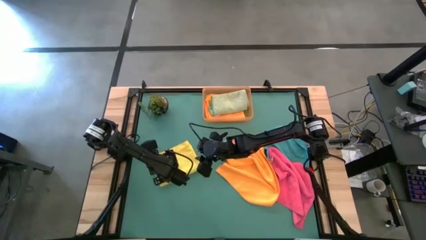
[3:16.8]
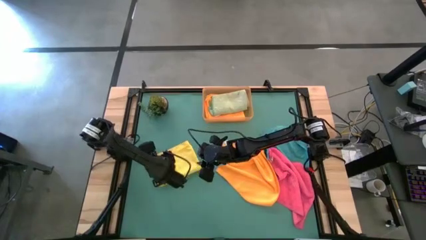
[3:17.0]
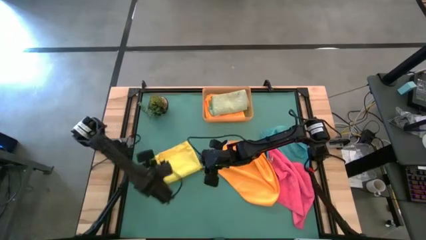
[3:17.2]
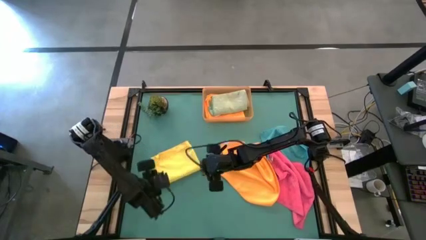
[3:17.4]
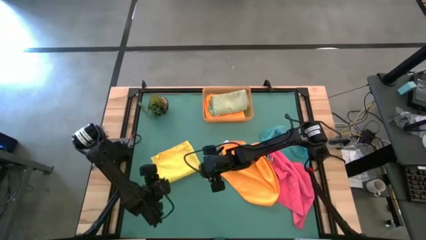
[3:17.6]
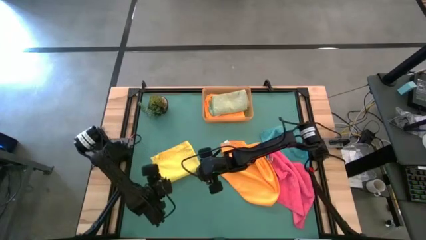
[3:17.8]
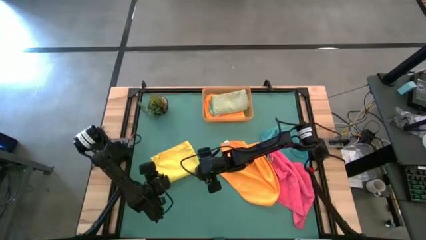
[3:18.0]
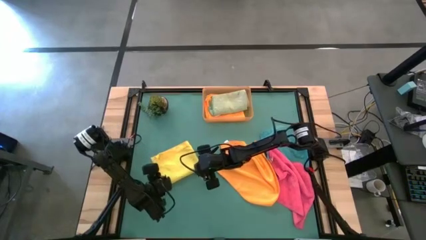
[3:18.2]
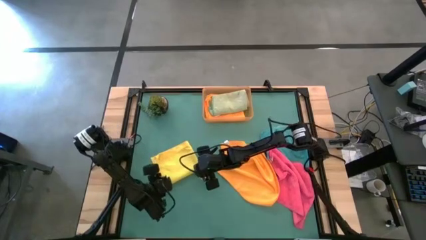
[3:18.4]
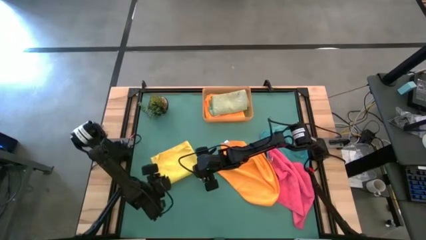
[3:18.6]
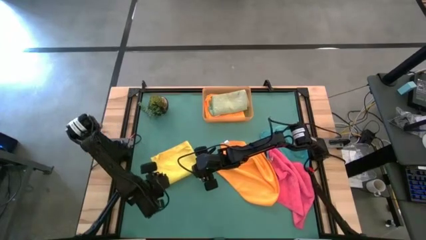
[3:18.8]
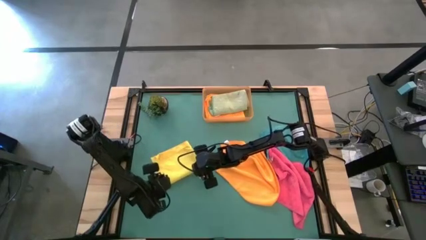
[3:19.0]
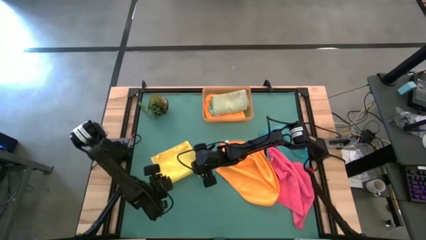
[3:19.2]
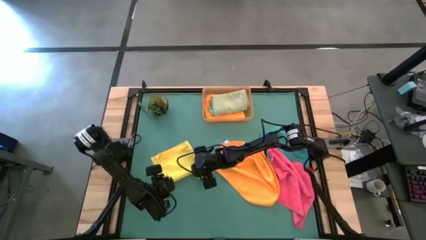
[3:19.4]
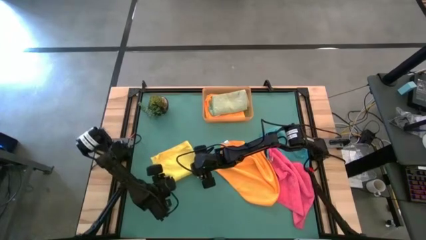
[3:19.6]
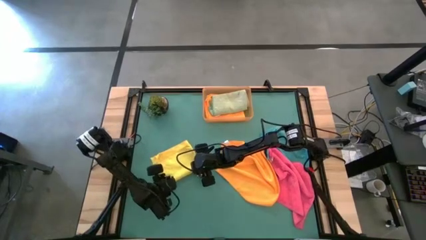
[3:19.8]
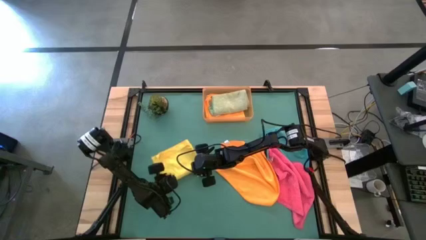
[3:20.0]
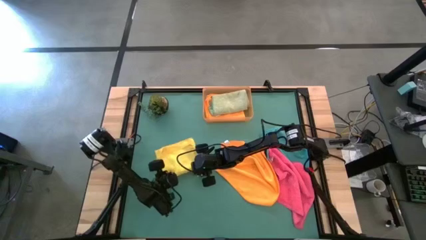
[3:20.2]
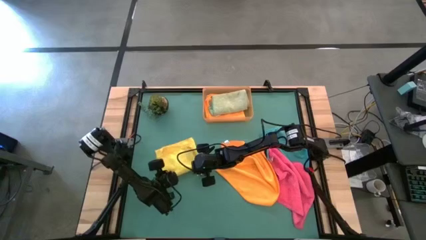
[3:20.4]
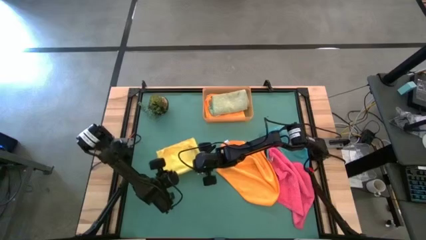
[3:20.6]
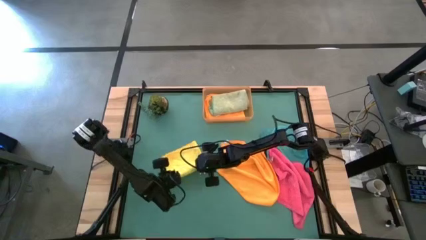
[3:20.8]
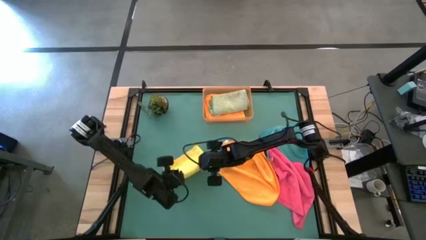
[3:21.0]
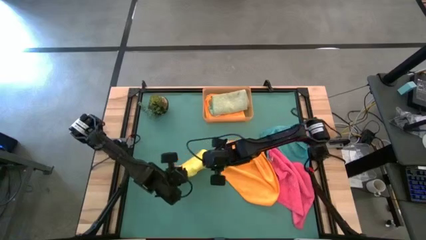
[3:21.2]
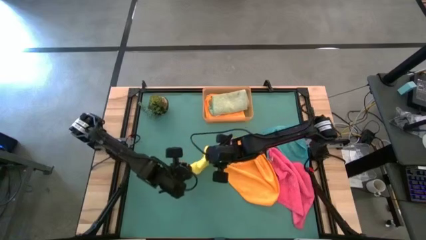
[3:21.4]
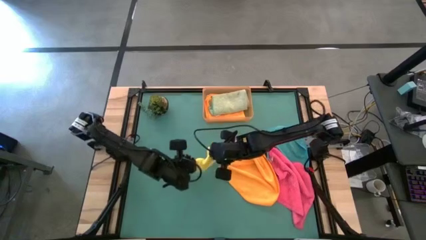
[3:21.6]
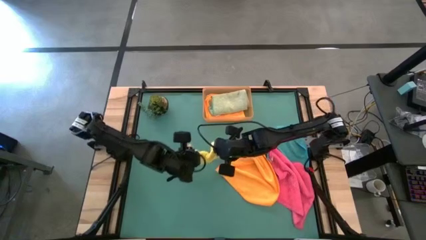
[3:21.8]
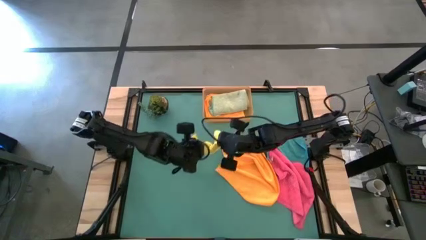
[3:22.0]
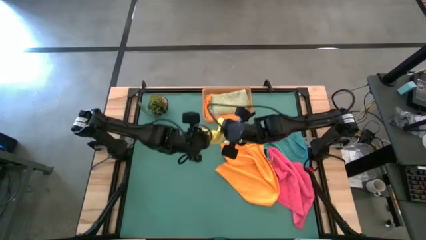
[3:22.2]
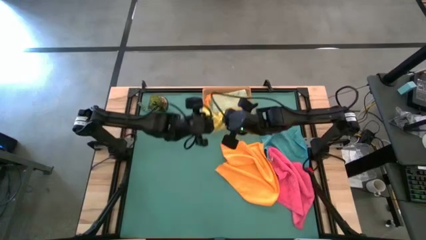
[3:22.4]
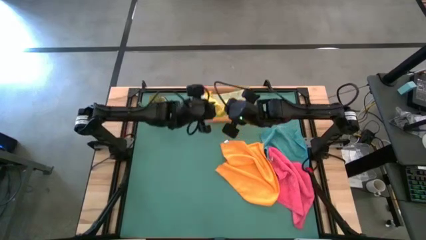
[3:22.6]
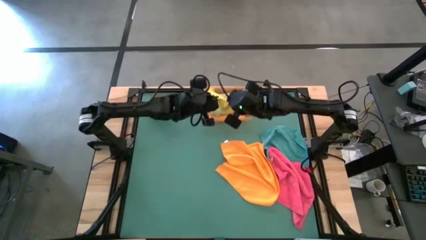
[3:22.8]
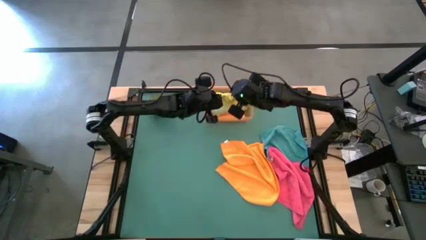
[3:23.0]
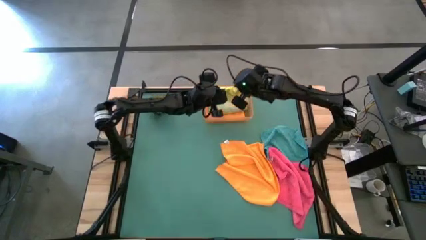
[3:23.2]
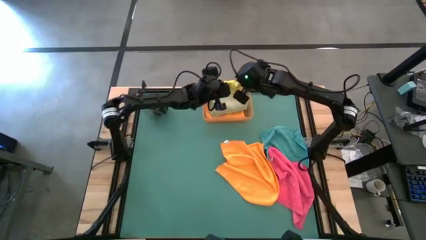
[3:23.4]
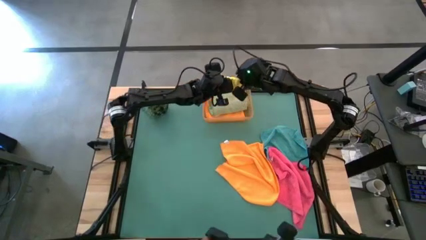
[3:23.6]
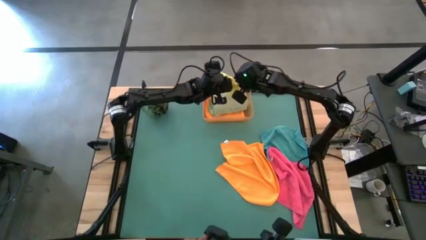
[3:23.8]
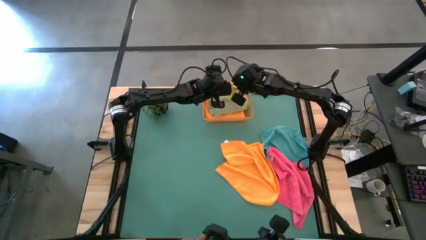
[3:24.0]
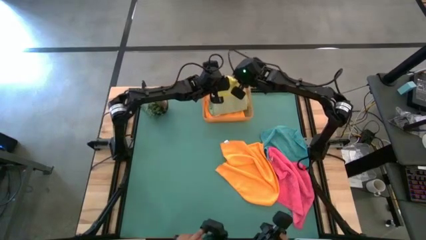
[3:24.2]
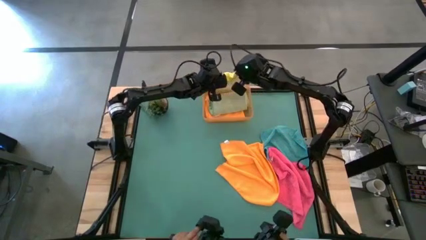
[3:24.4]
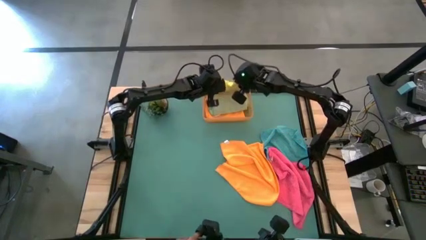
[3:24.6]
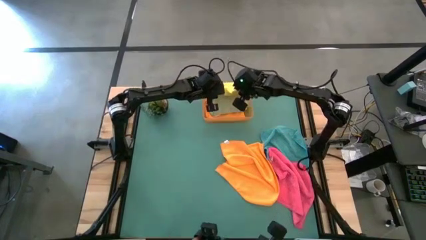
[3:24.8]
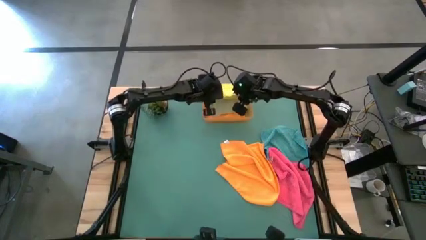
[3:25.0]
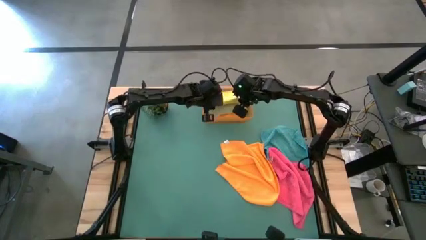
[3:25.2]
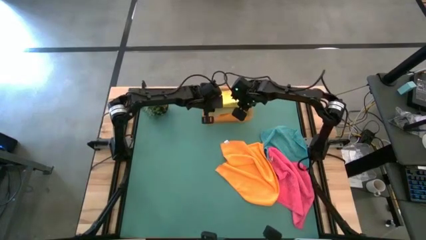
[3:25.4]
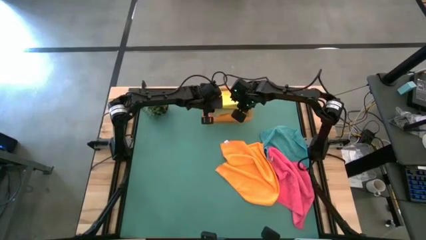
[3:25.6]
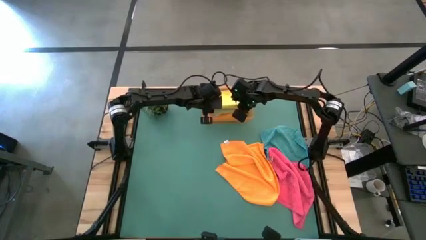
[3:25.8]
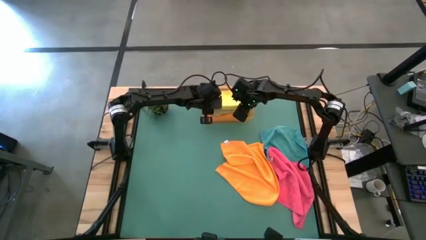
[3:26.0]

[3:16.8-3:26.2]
Task: Fold microfiber towels
Put the yellow folded towel into the orange bin

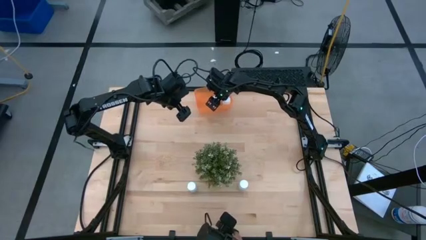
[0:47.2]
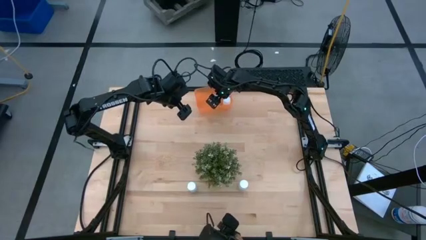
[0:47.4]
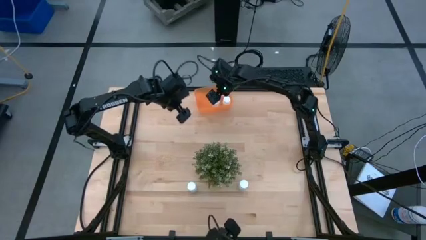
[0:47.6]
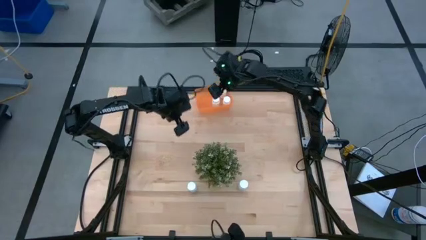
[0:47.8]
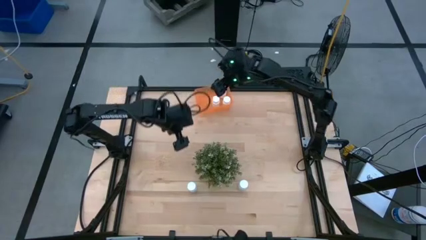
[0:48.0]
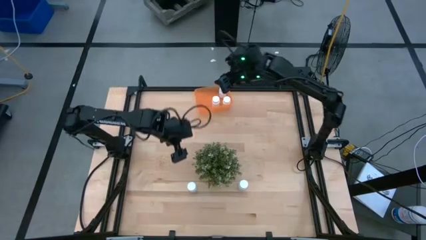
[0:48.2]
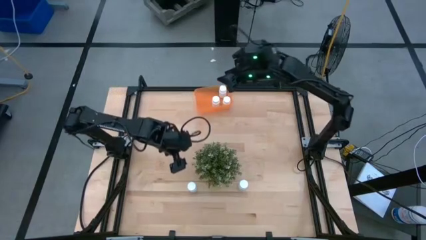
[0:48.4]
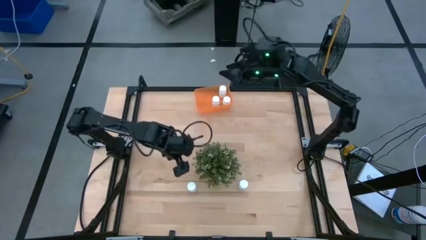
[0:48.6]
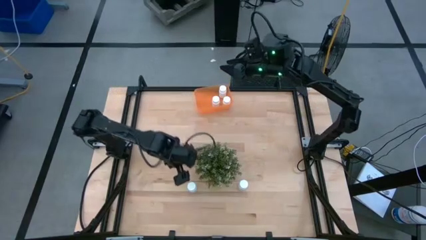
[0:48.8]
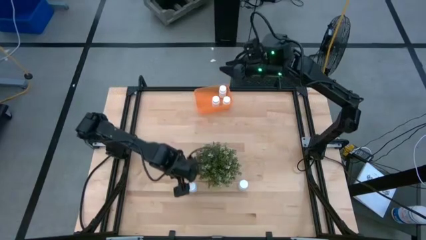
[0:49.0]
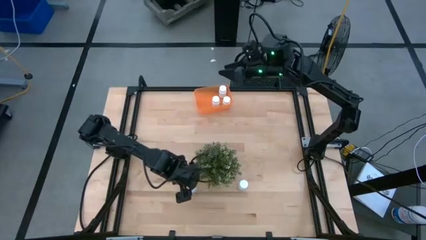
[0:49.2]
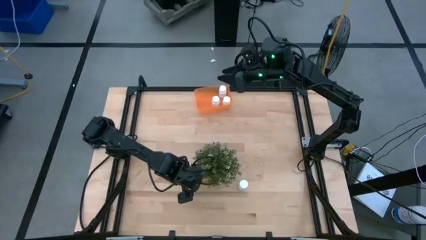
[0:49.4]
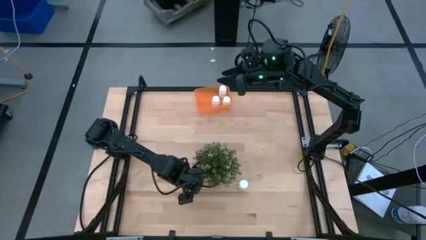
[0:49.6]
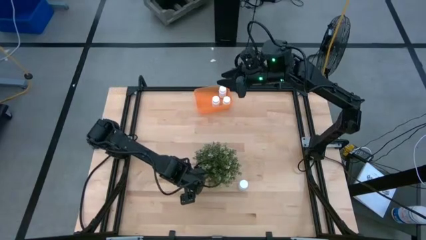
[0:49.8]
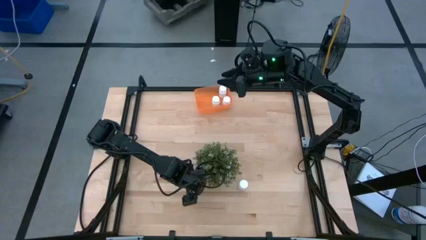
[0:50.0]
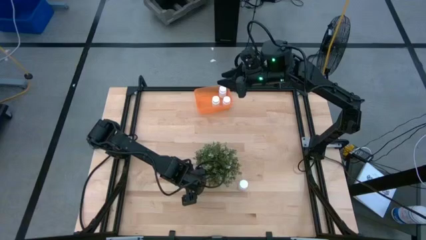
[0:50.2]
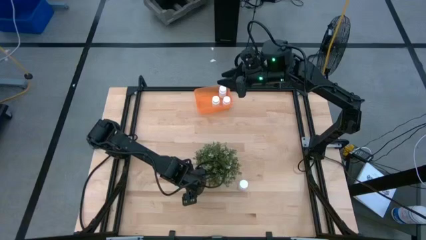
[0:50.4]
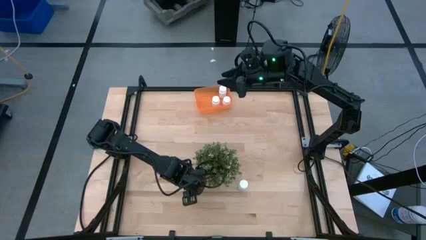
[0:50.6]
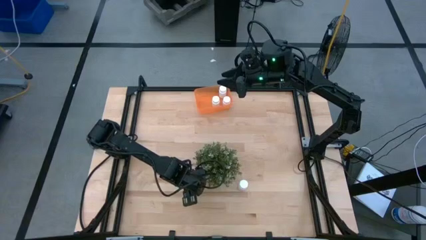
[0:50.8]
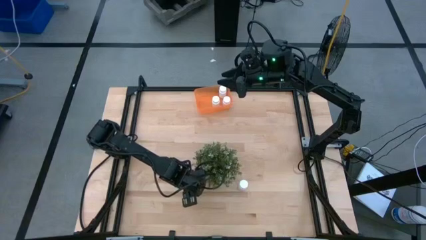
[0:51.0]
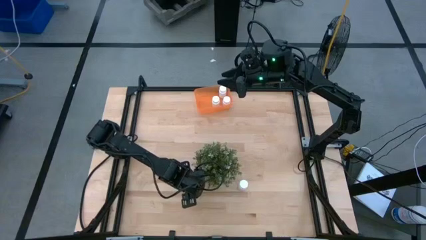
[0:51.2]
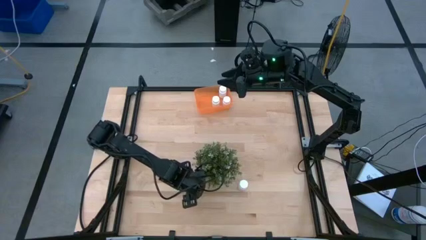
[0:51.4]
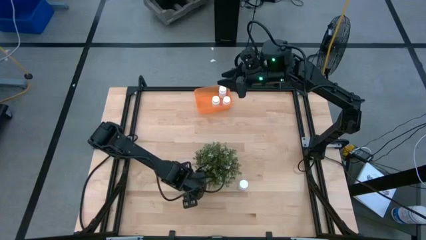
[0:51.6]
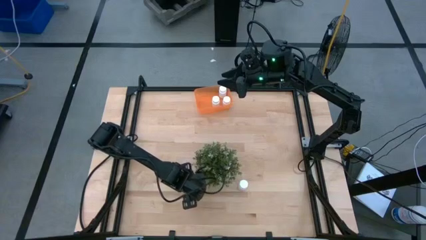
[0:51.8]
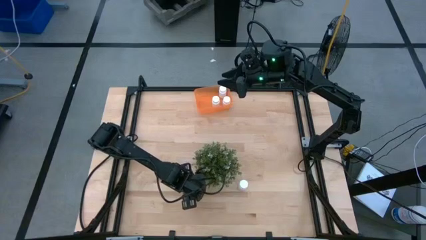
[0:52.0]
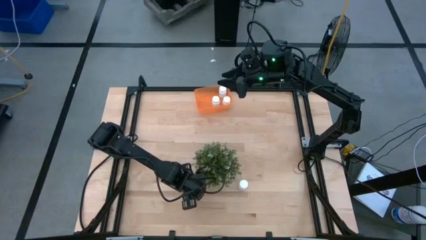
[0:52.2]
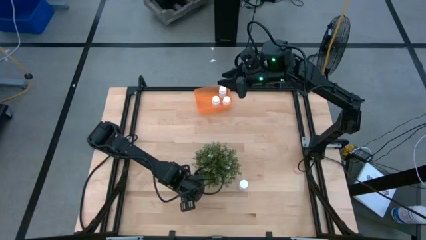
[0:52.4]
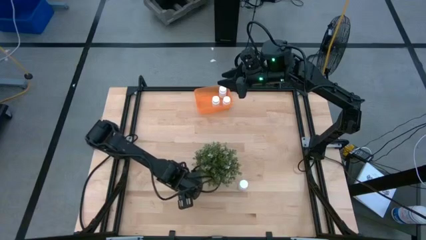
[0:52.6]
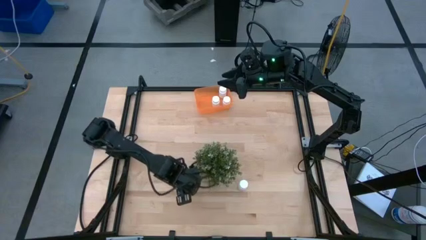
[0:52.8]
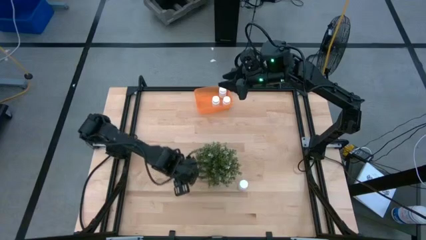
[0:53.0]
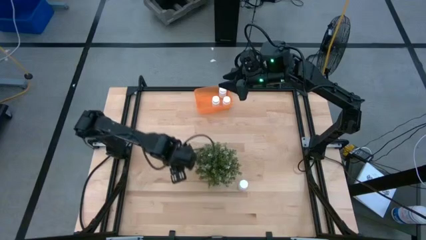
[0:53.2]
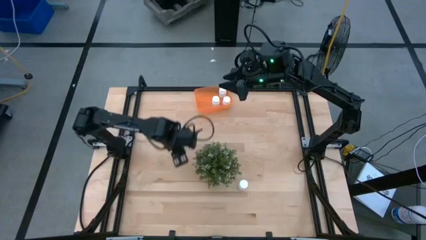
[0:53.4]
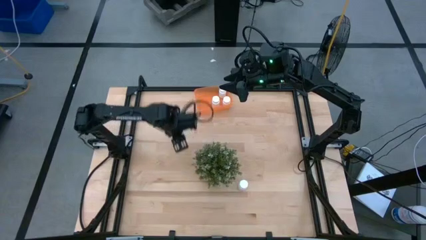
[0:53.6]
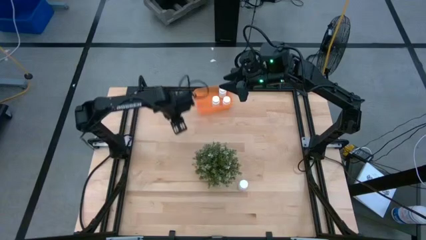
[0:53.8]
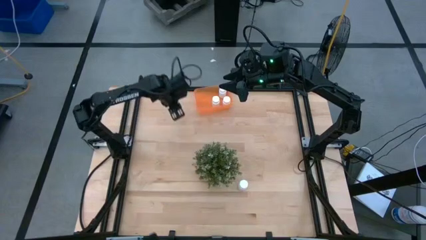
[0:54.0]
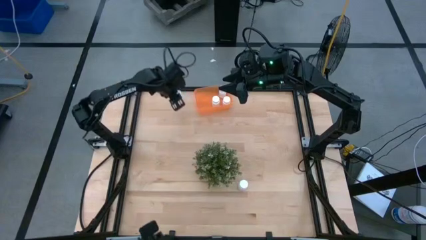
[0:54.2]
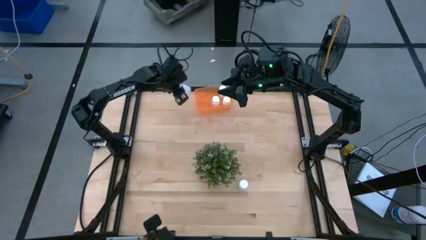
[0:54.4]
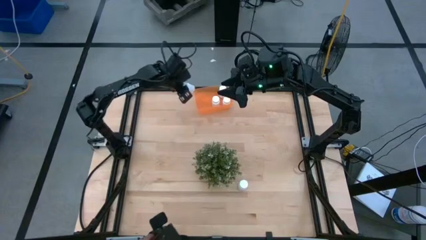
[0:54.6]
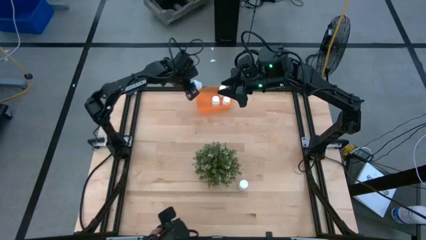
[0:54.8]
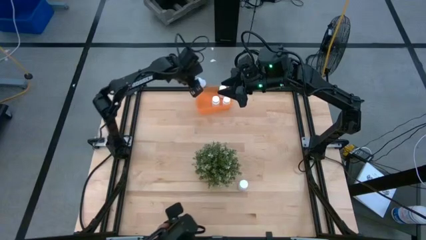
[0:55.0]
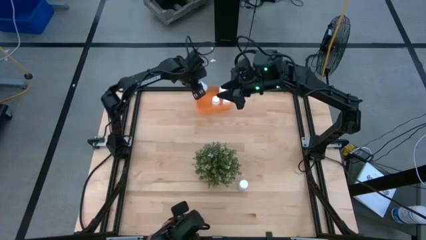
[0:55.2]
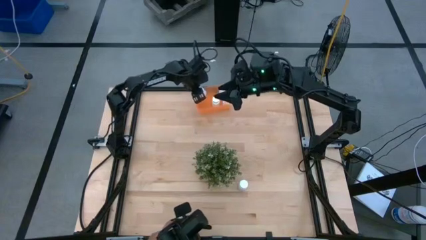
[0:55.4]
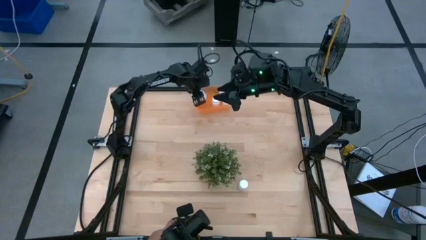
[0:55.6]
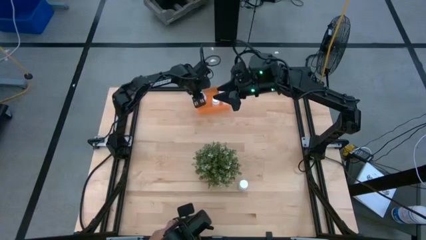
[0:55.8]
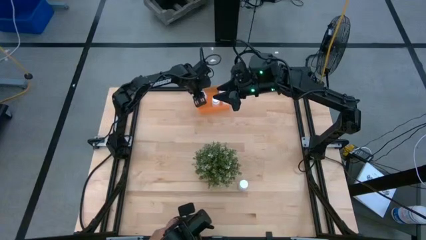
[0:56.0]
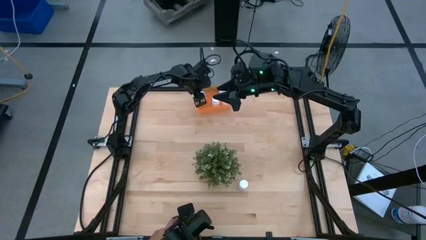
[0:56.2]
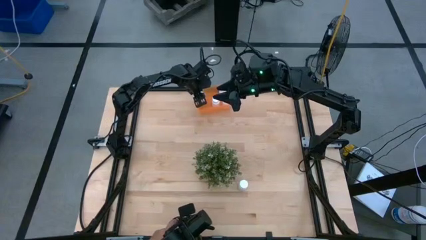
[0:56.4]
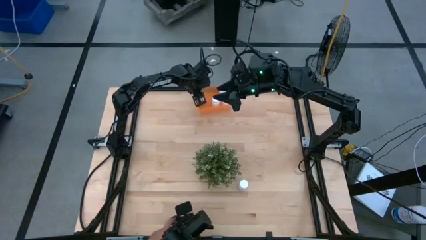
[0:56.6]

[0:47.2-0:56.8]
Task: Pick and place pill bottles into a basket
Put the left white pill bottle into the orange bin
